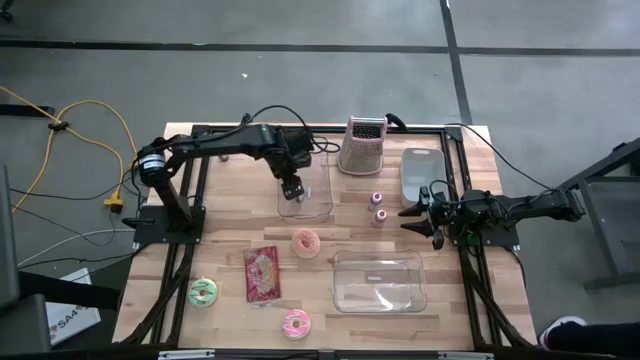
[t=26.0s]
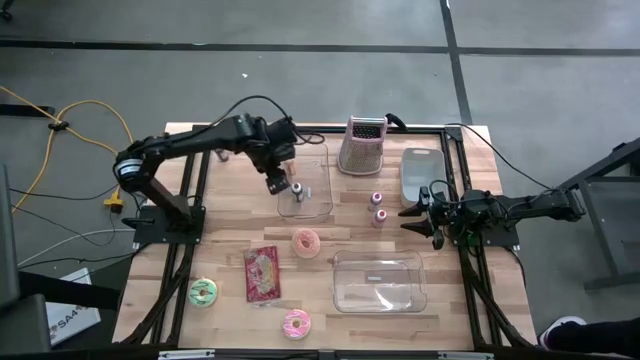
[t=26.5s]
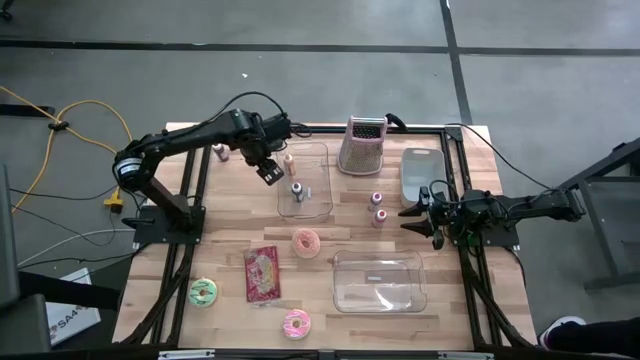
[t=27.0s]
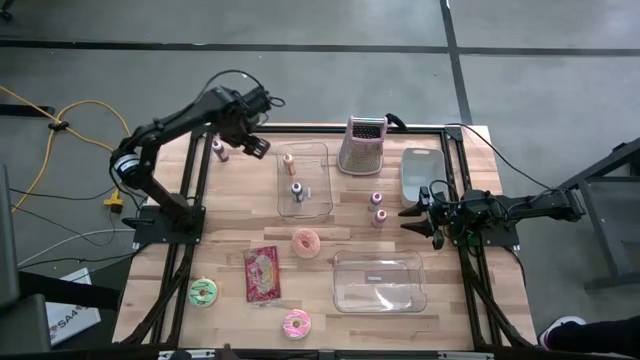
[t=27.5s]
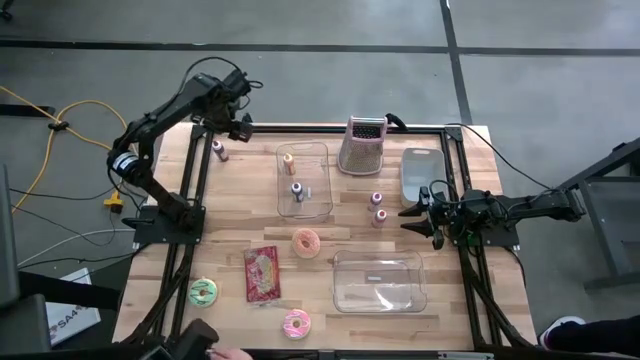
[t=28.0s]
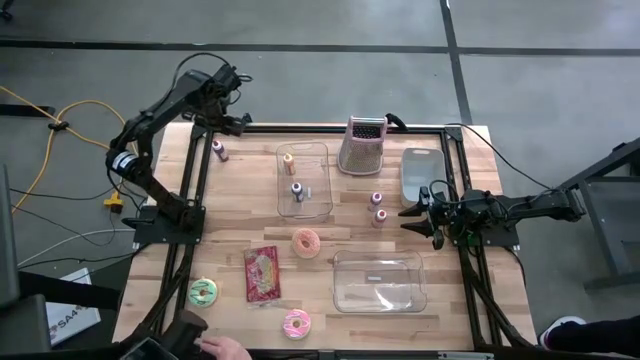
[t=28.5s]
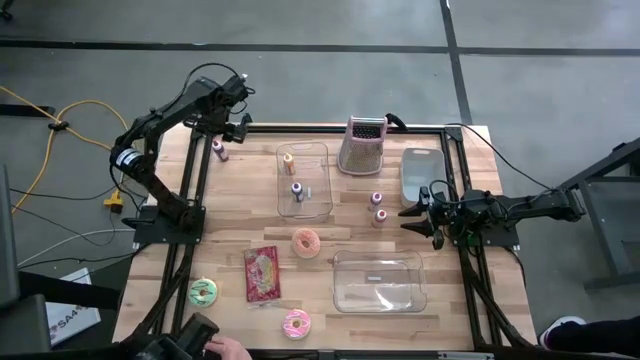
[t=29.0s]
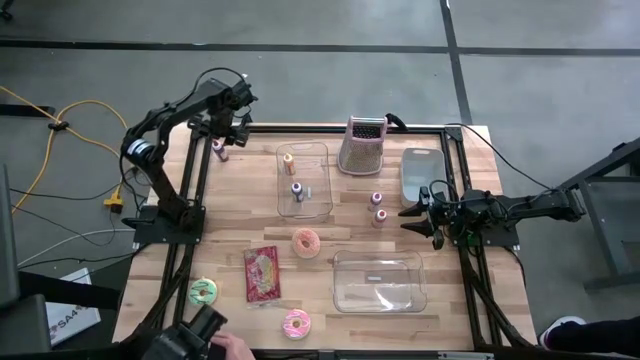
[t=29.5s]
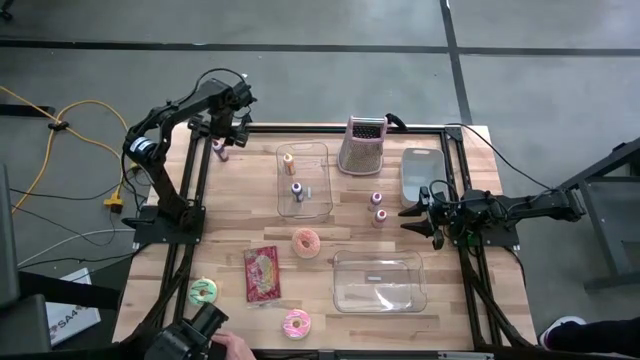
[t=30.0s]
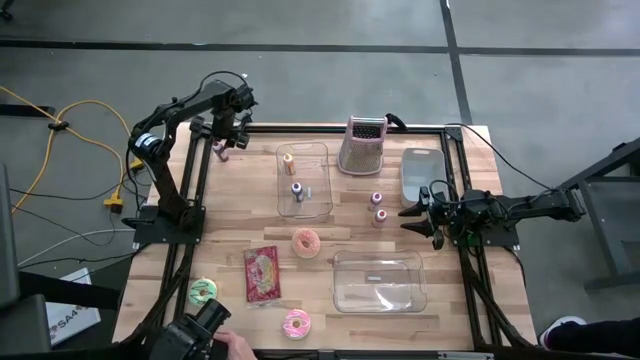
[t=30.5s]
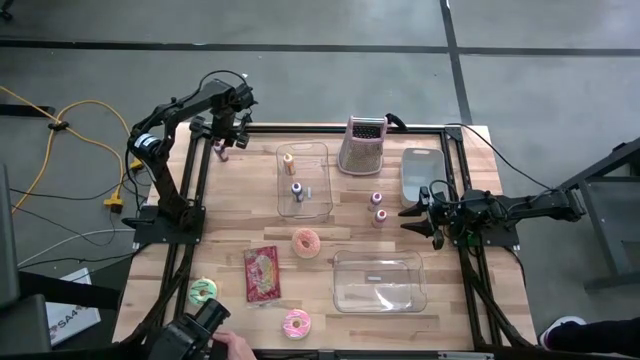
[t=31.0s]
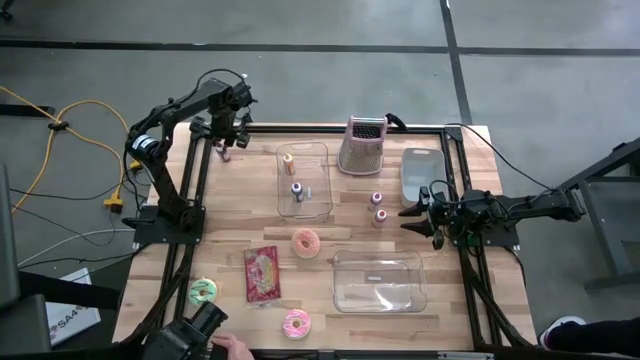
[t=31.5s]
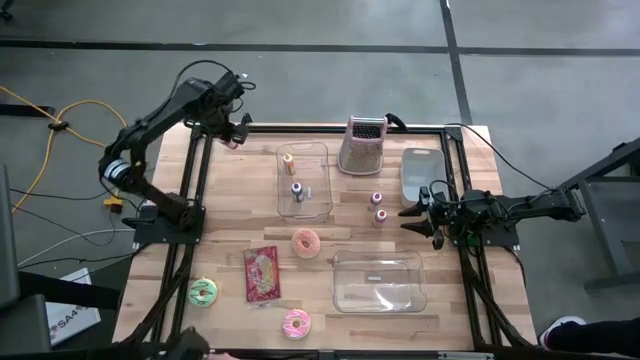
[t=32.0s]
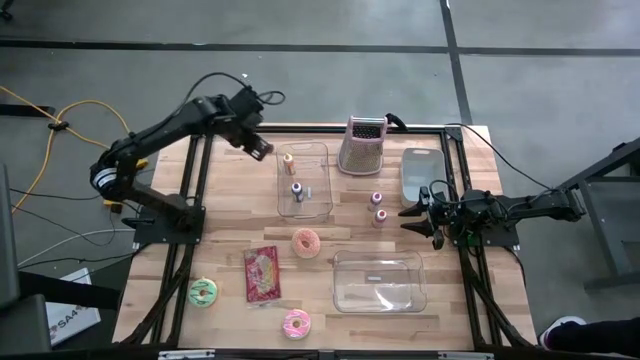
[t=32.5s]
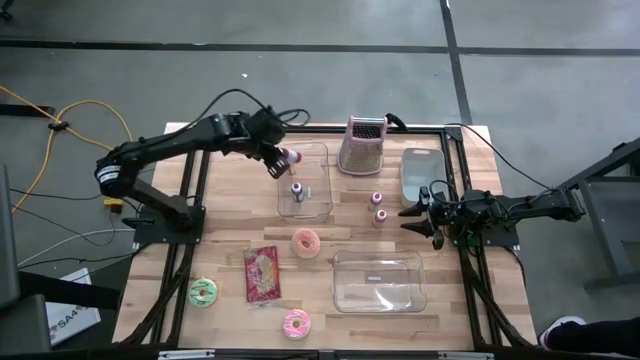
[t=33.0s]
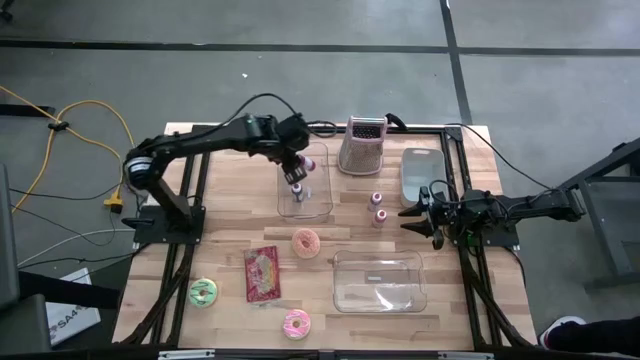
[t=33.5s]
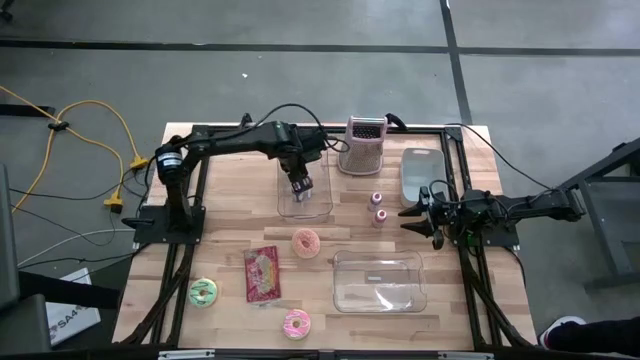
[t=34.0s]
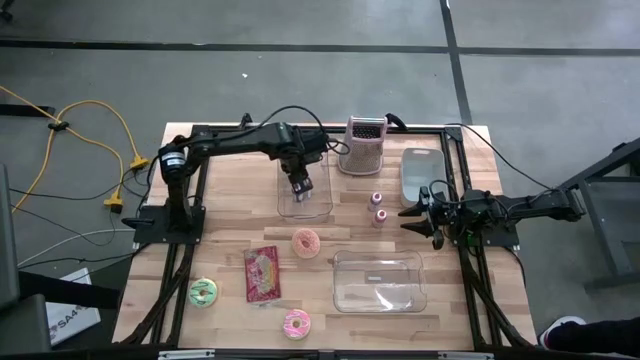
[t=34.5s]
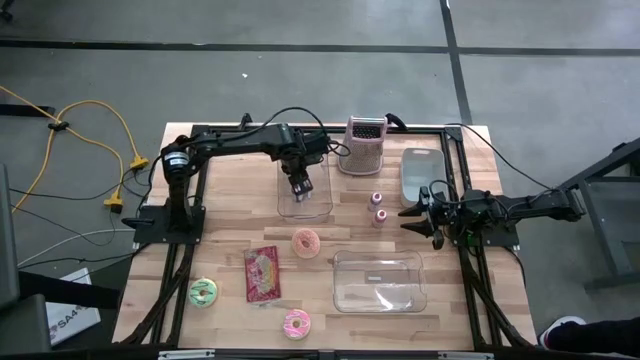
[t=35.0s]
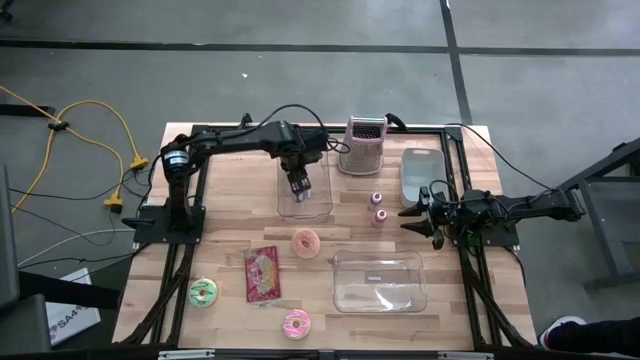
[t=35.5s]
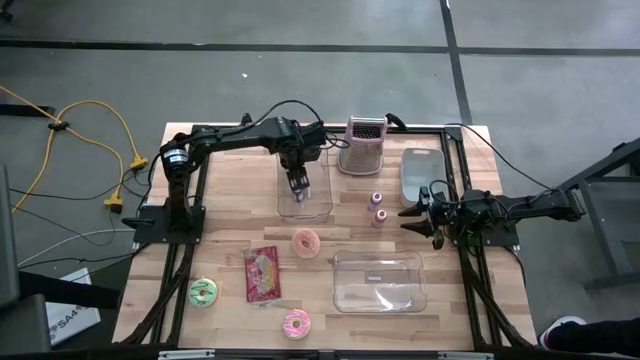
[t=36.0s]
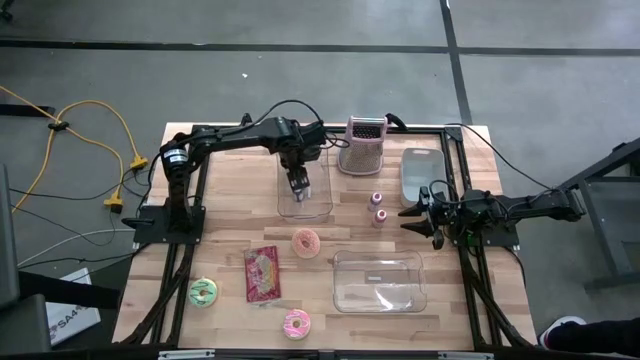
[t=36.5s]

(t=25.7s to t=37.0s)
Put the left red food coloring bottle into the top transparent bin

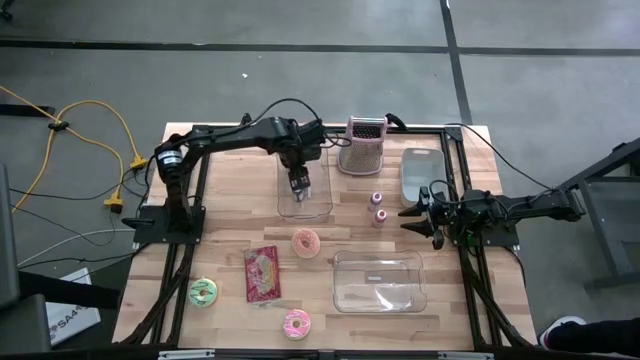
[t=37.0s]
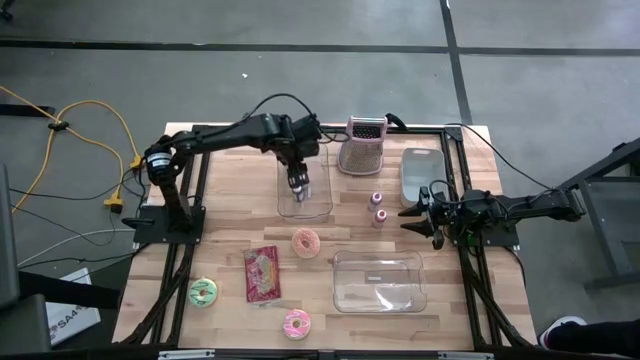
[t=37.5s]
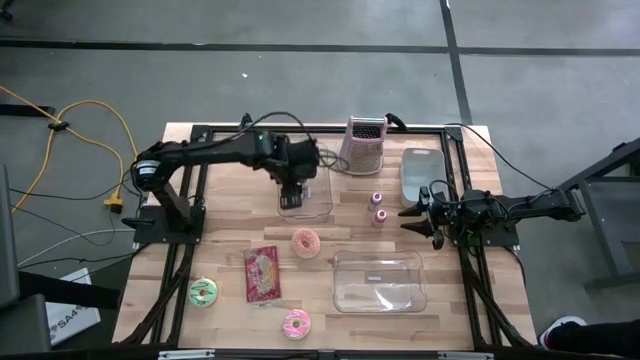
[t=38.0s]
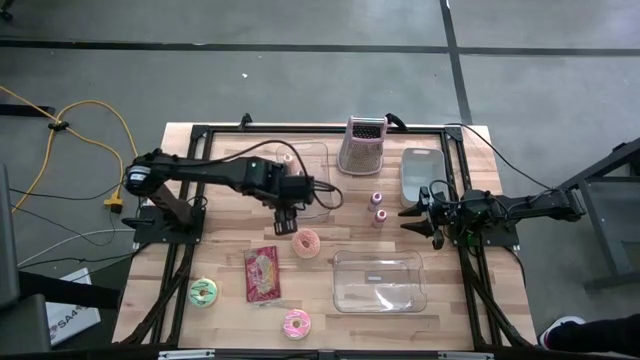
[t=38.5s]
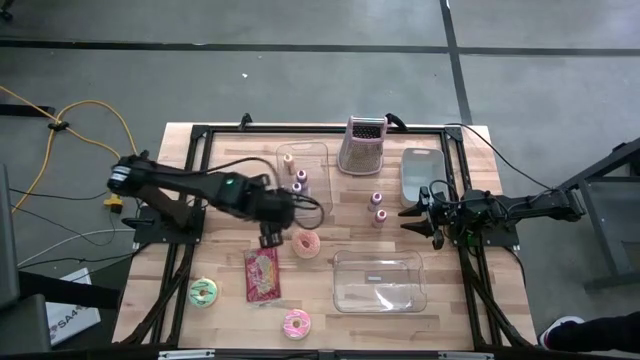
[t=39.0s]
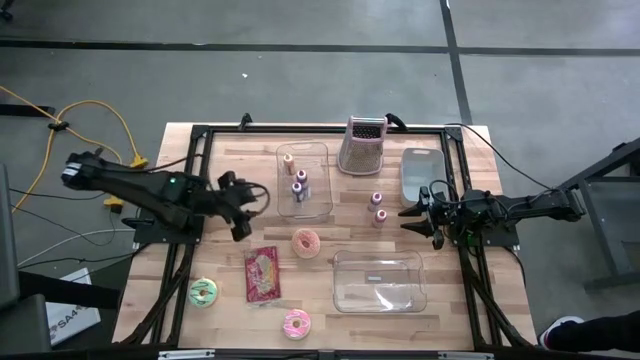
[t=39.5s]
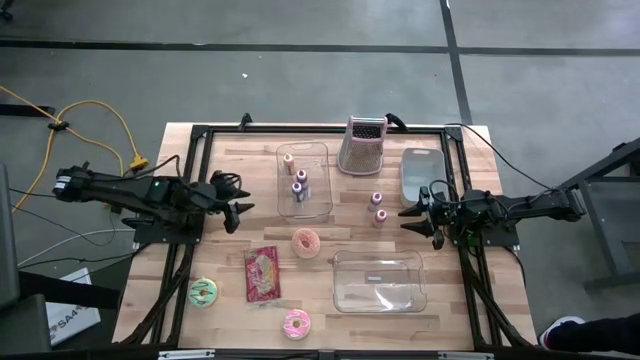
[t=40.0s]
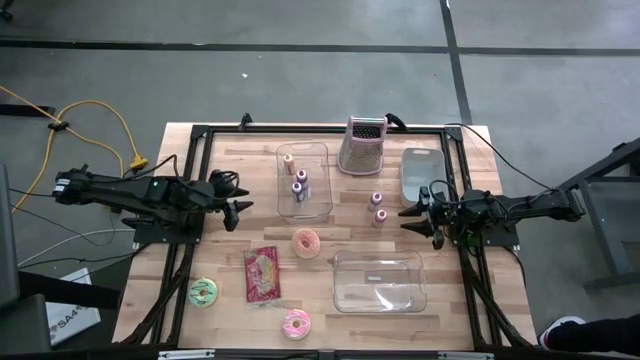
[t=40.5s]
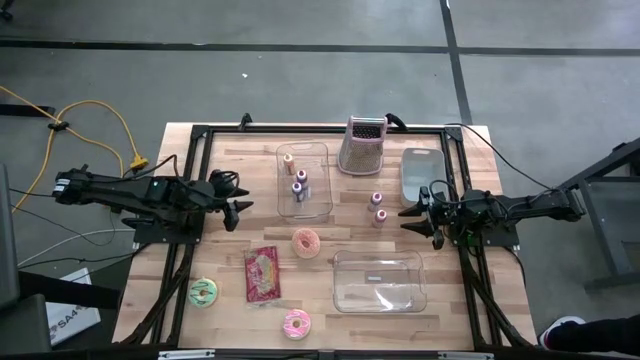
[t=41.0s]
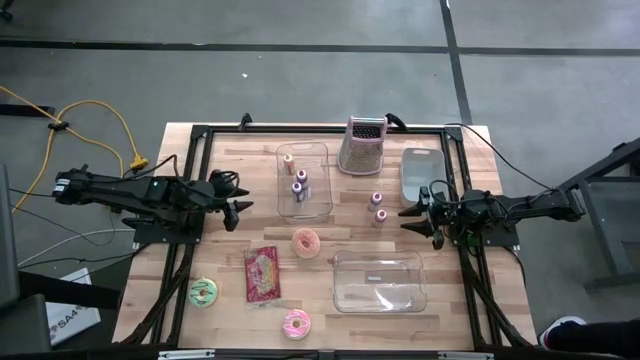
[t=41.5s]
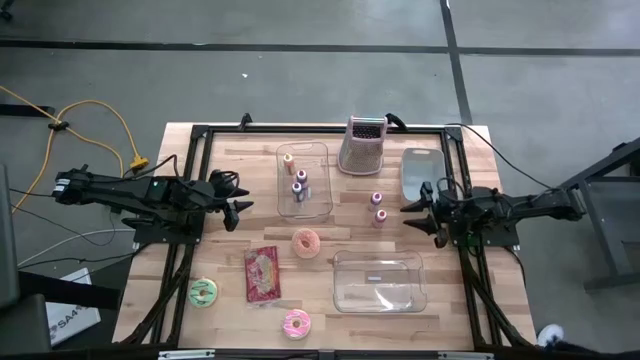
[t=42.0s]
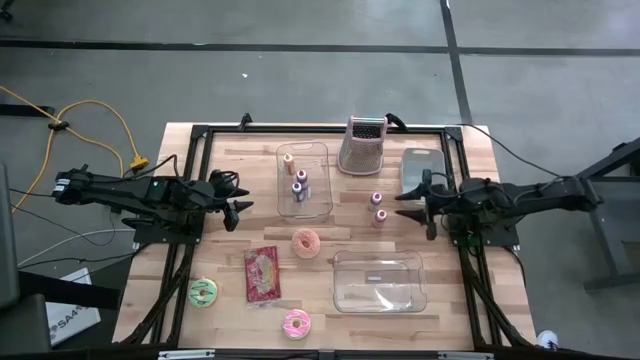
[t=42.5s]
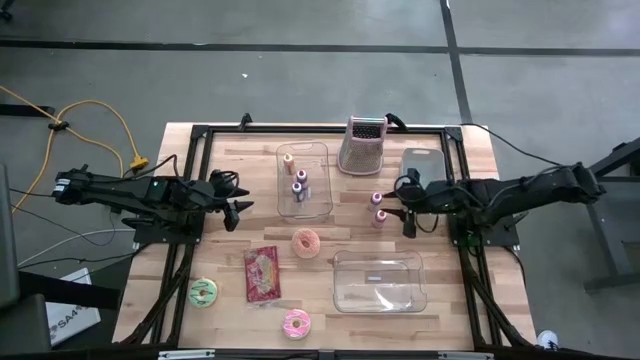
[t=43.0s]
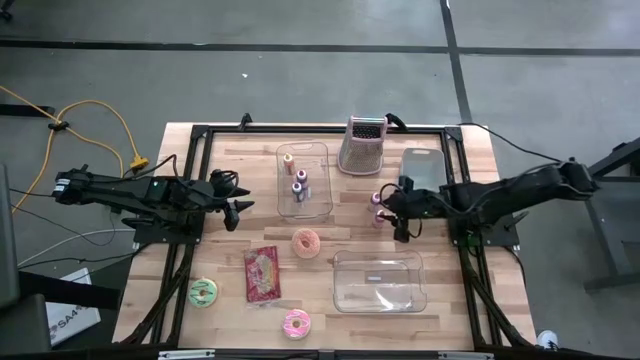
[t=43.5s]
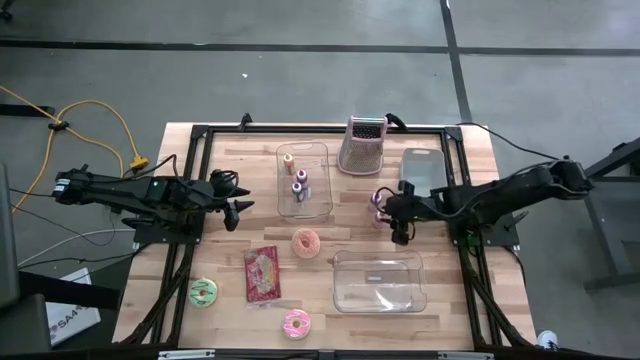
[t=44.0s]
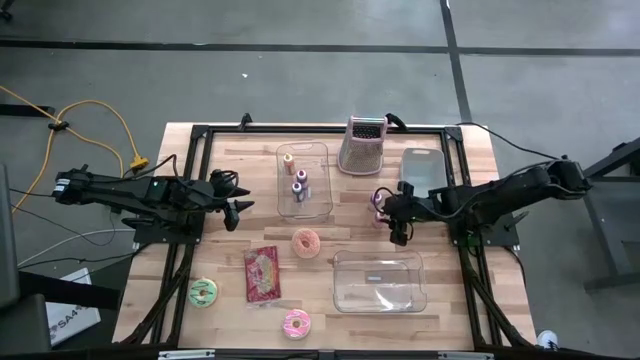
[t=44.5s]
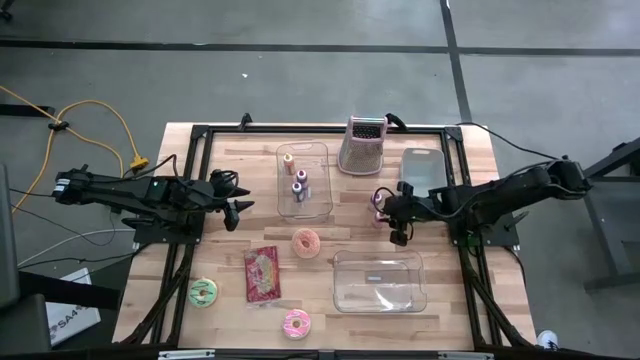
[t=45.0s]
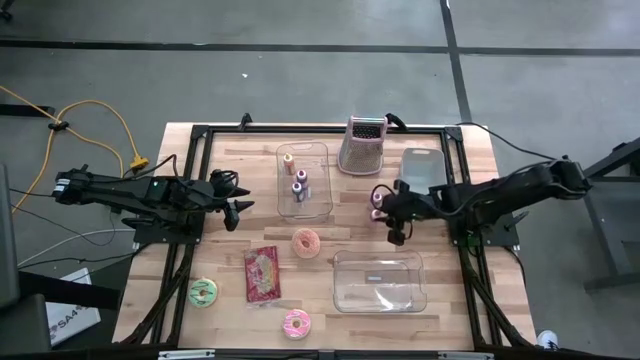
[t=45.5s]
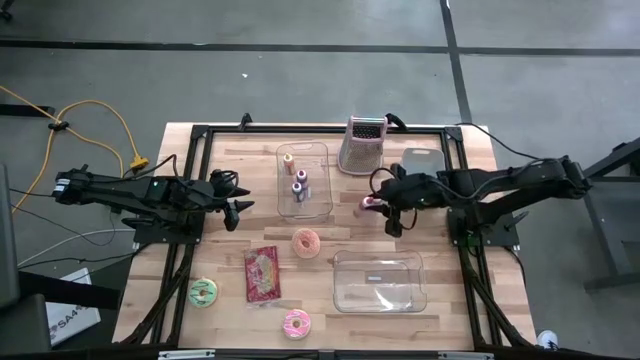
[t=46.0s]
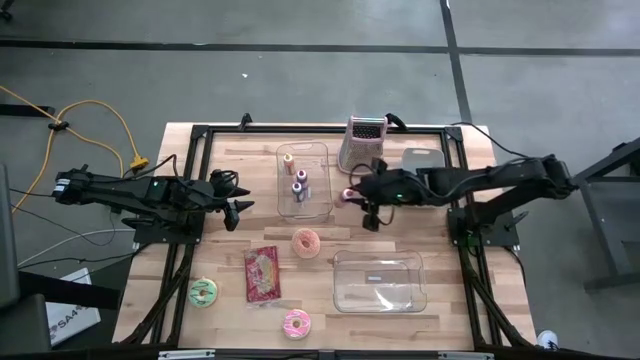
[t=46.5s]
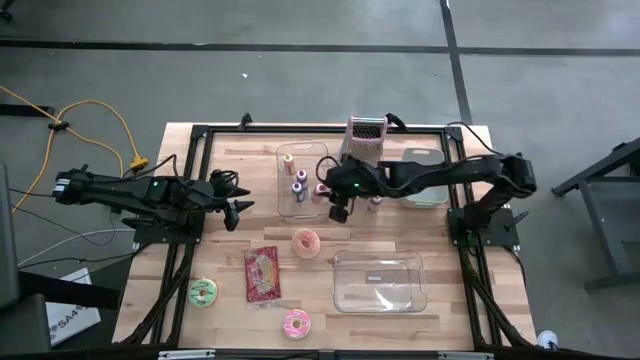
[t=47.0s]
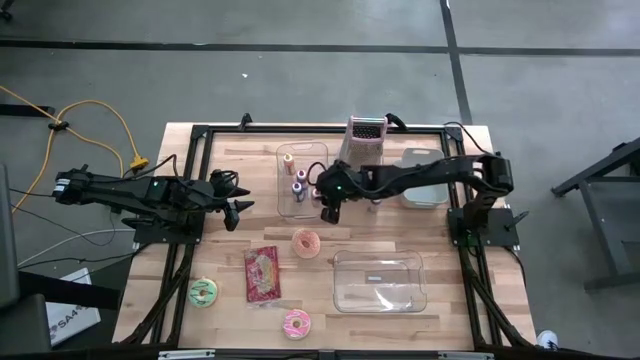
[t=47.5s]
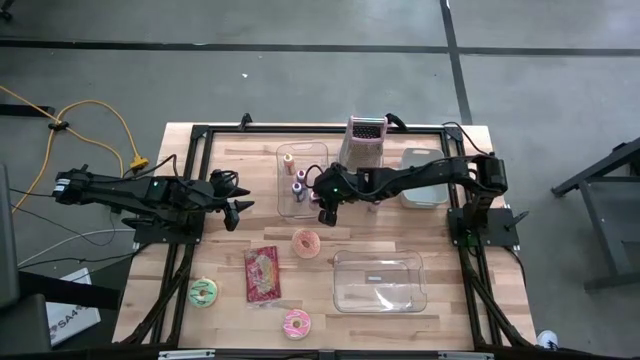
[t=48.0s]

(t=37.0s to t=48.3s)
Put the orange food coloring bottle into the top transparent bin
